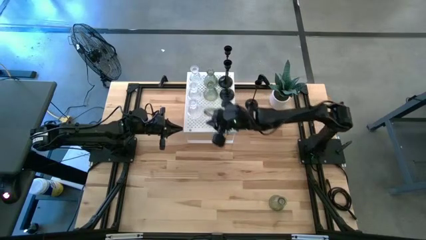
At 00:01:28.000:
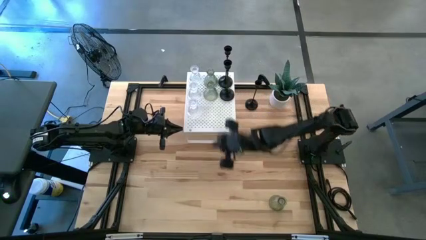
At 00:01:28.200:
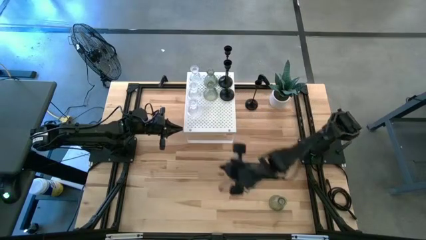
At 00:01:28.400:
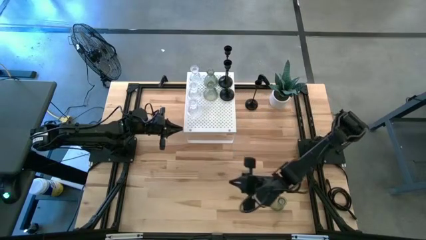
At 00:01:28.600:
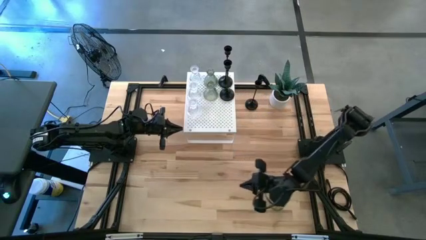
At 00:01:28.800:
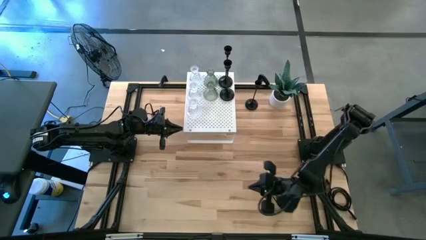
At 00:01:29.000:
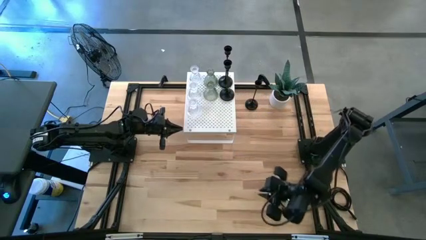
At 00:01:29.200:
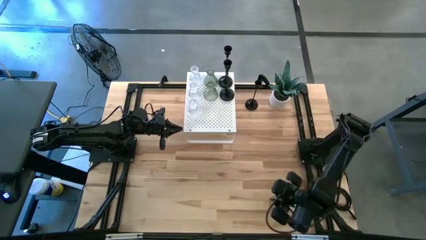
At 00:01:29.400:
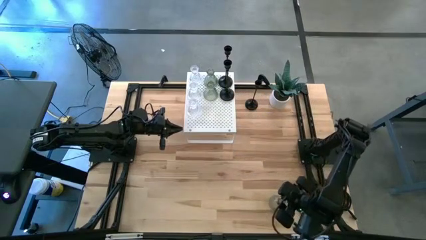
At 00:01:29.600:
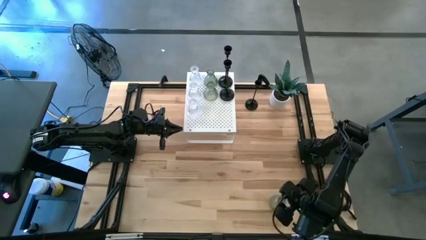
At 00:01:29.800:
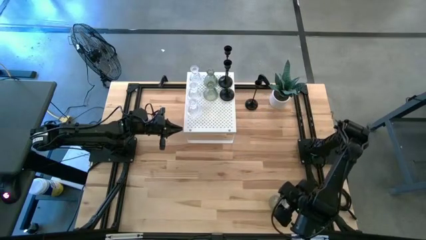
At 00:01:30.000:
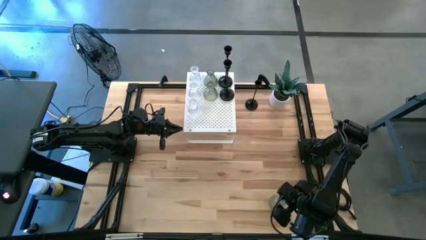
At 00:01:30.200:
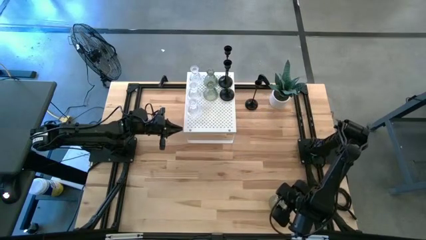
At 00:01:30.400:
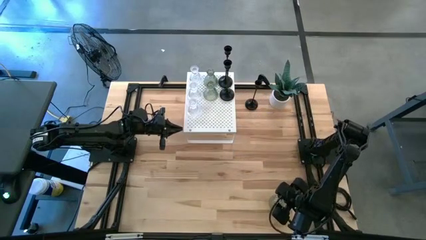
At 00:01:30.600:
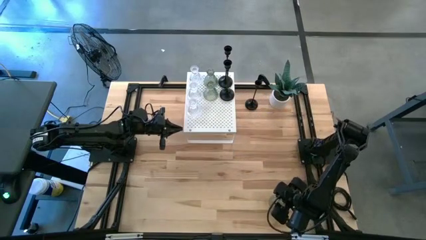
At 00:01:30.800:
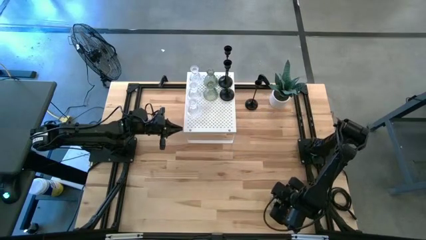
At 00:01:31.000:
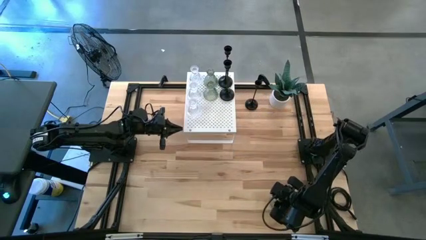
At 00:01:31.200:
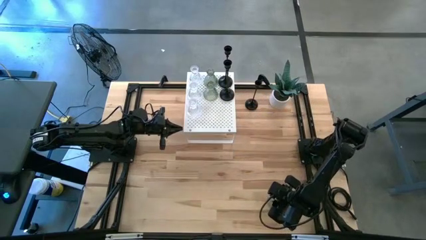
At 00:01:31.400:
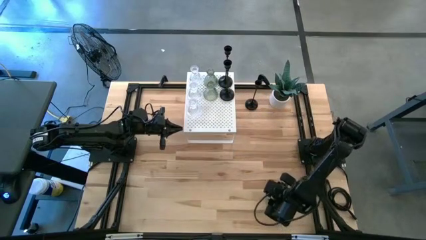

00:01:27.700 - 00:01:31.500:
Task: Pick & Place candle stick holders
Put the green glass candle holder on the shelf aligned with the other green glass candle holders

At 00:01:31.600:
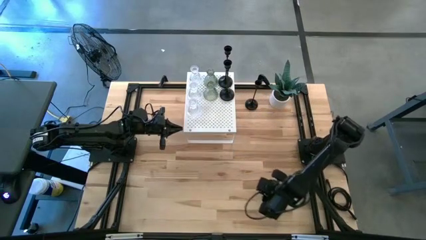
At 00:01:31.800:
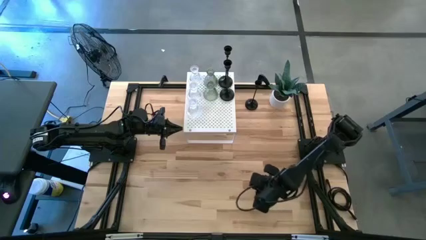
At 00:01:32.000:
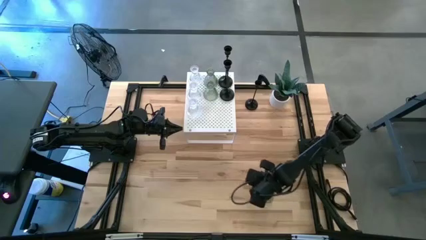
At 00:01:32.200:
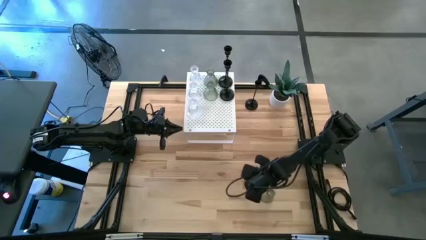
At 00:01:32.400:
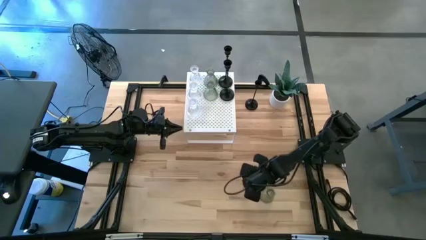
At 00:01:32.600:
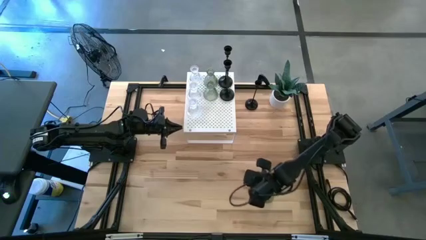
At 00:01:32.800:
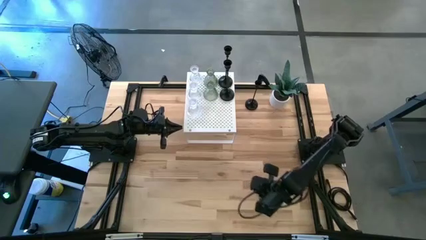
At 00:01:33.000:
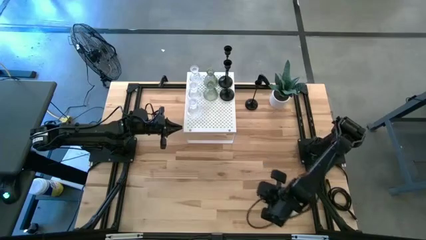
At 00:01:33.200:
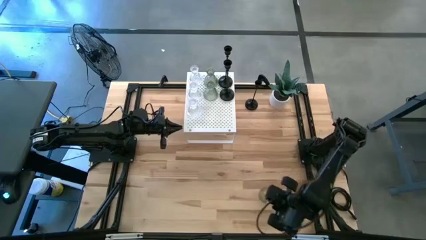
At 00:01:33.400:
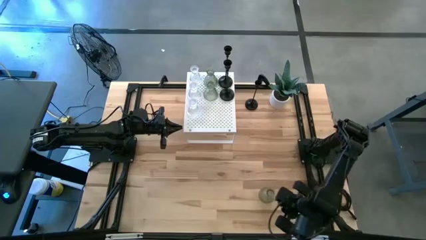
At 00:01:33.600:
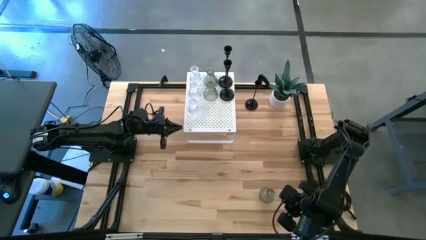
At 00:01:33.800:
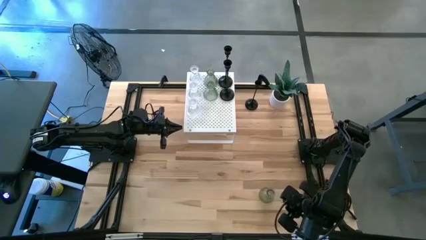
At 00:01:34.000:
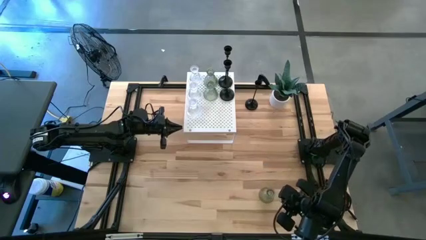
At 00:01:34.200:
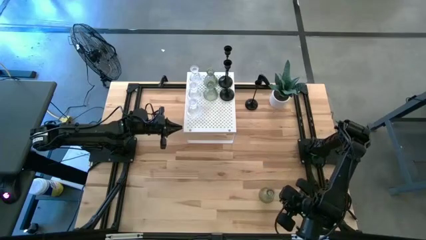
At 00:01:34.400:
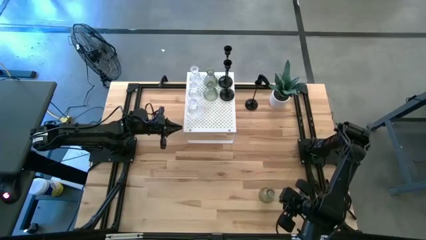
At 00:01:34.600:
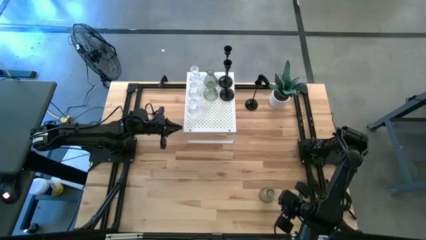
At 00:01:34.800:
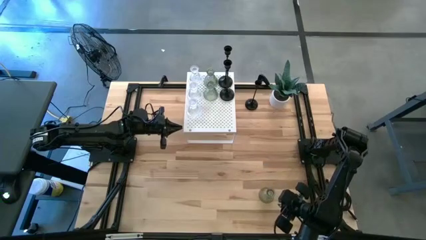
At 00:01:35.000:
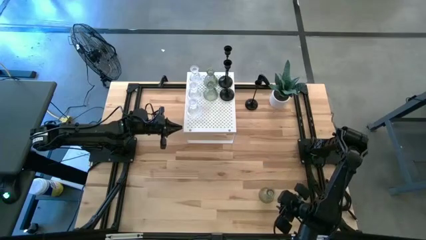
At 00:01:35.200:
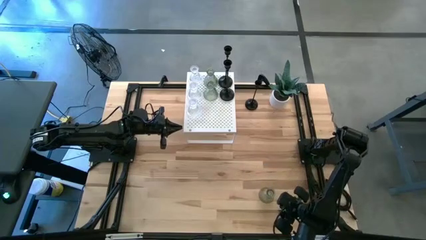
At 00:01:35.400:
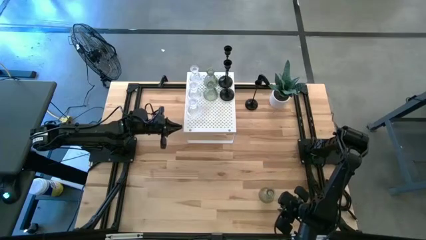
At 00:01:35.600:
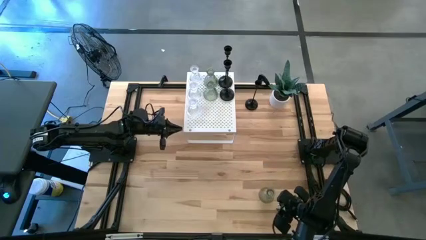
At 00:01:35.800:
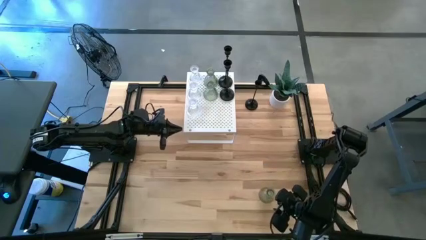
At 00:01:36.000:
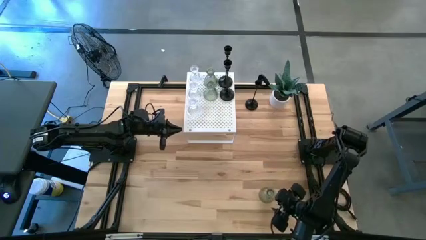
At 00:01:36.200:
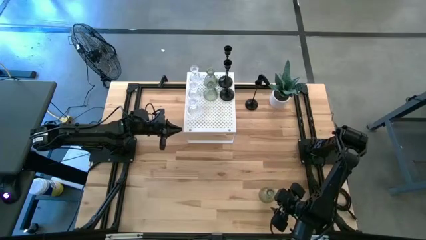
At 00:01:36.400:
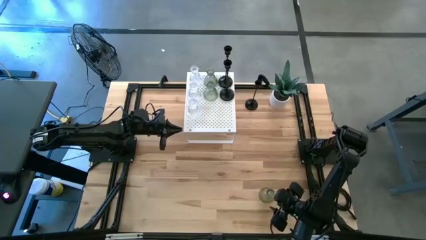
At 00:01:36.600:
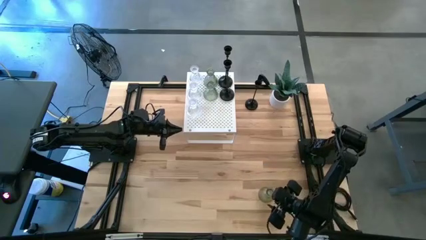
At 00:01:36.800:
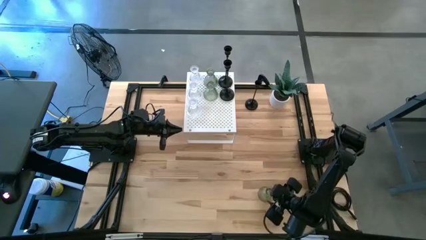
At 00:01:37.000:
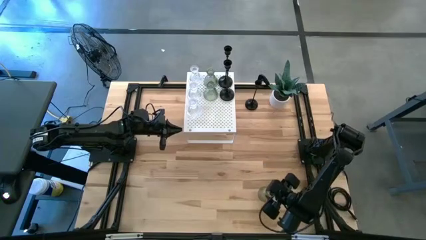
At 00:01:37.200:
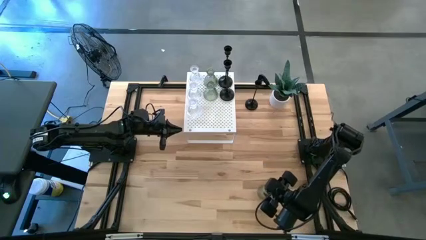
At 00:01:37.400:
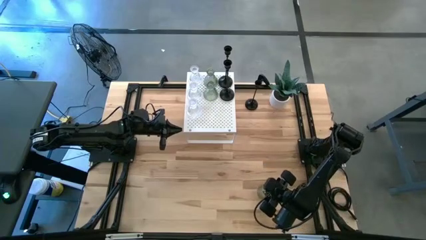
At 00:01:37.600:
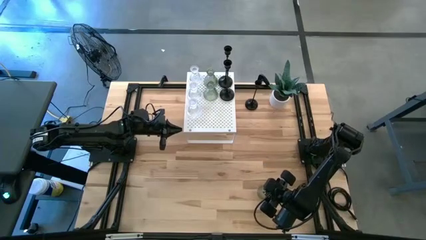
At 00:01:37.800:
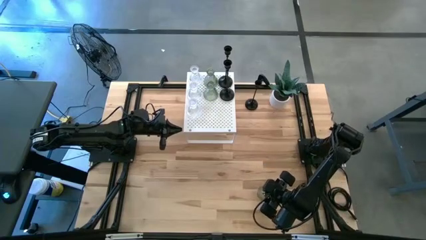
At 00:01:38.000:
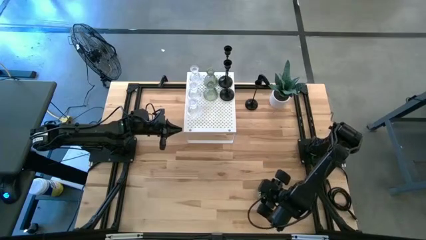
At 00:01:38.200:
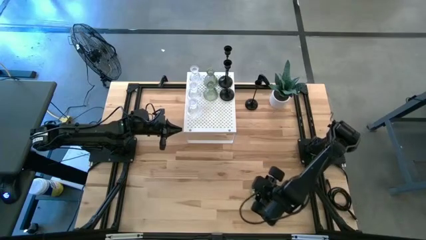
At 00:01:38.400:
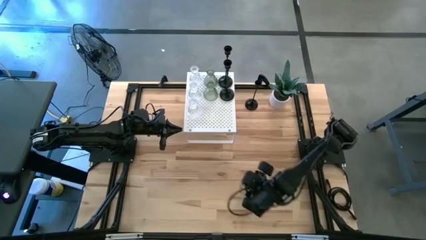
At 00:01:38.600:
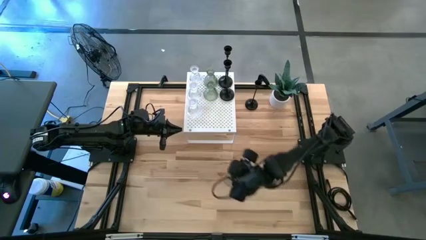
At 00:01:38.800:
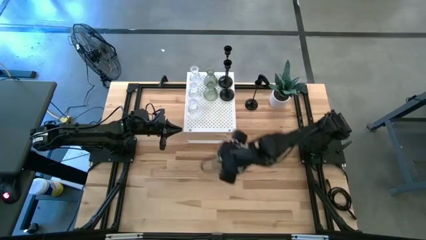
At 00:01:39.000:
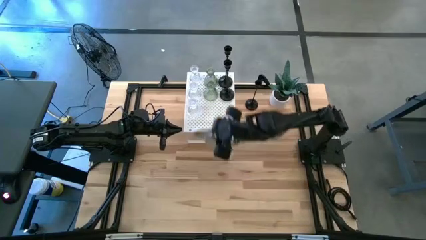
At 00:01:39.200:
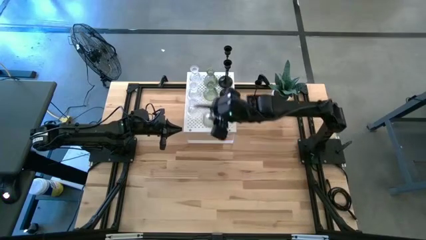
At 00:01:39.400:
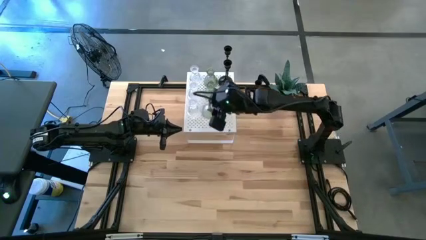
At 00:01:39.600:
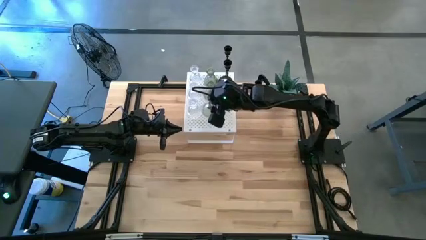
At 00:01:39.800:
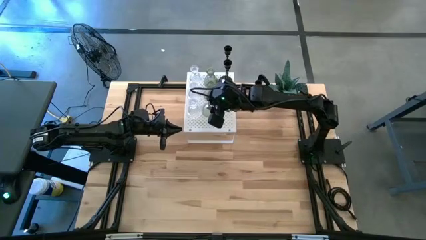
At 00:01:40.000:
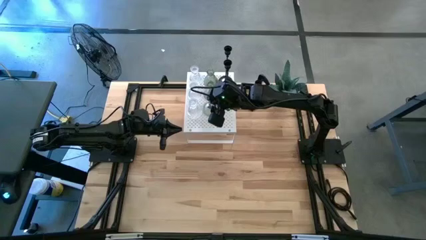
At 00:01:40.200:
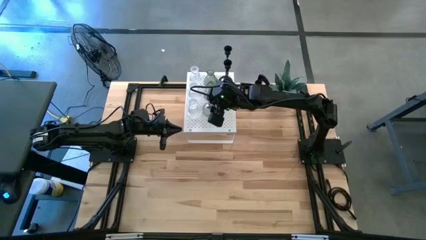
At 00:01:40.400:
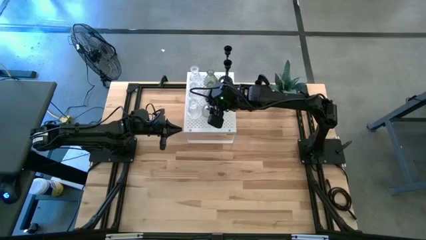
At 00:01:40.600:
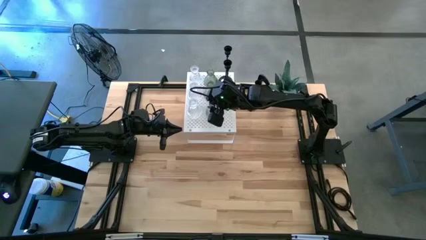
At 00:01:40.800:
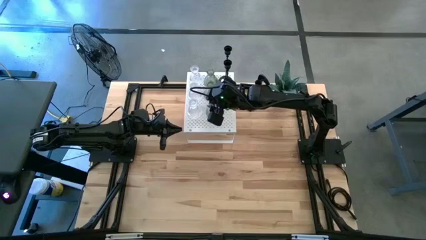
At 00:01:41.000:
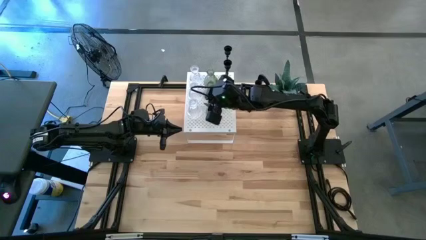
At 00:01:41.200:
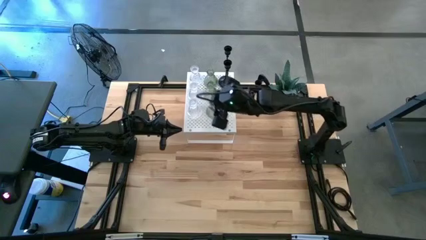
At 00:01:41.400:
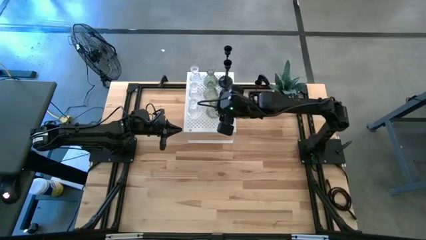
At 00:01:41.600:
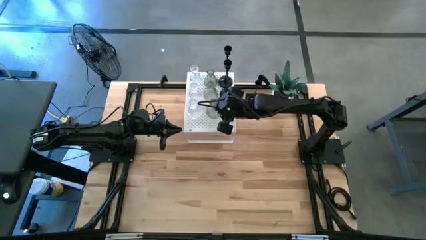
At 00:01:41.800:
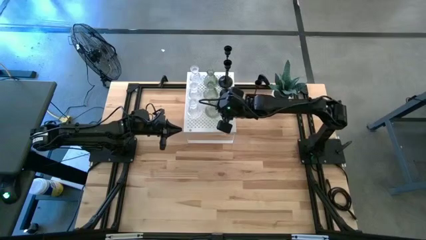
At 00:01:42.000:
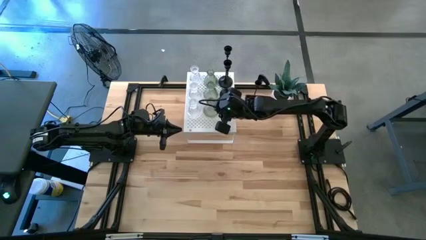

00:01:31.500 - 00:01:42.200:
Put the green glass candle holder on the shelf aligned with the other green glass candle holders
